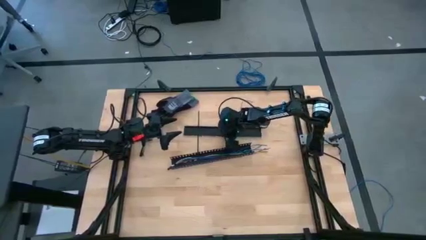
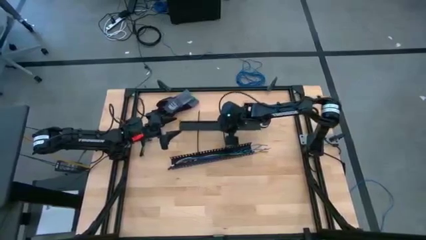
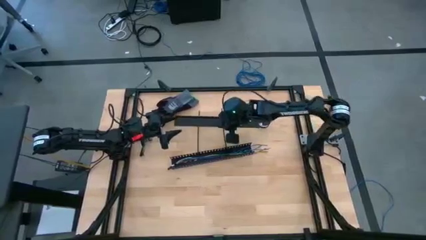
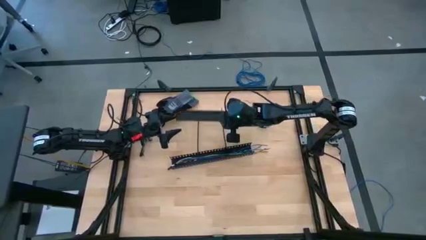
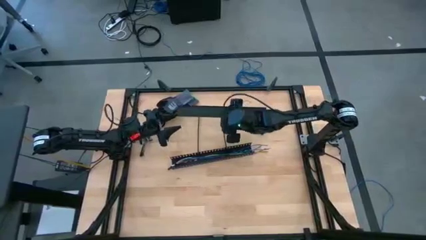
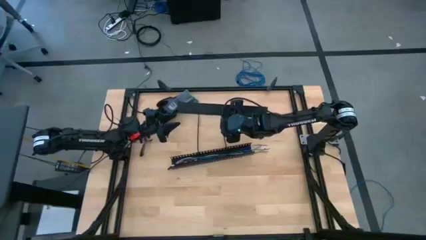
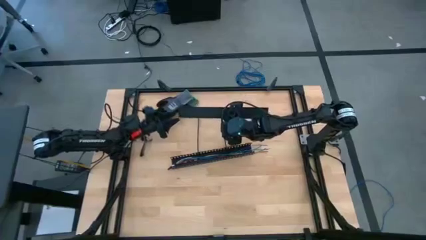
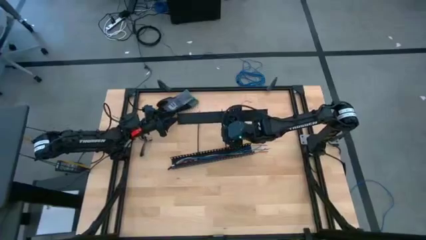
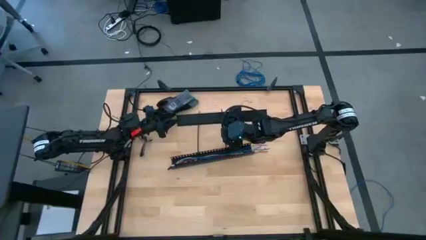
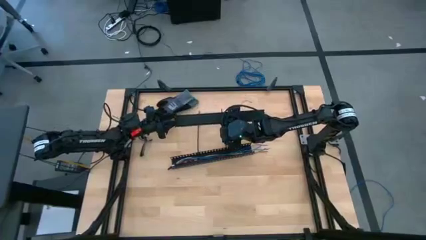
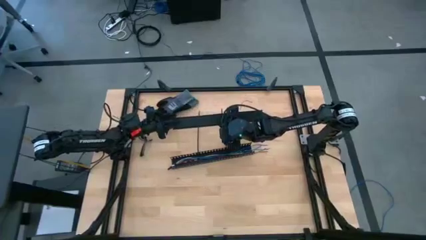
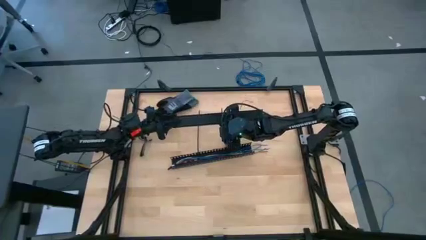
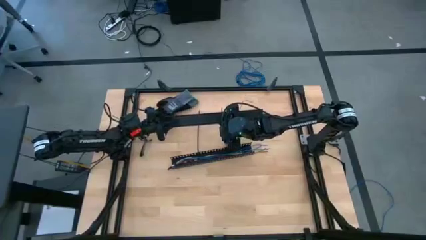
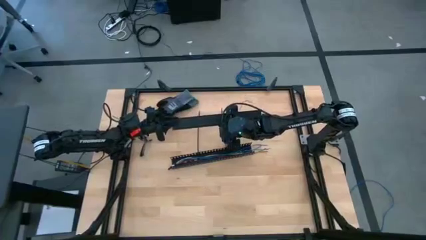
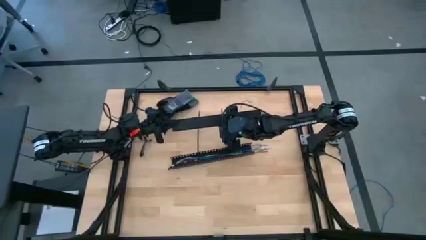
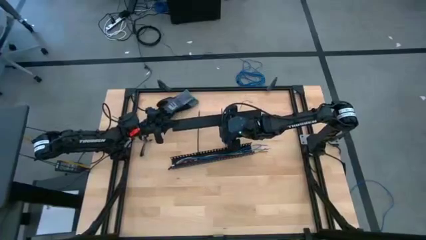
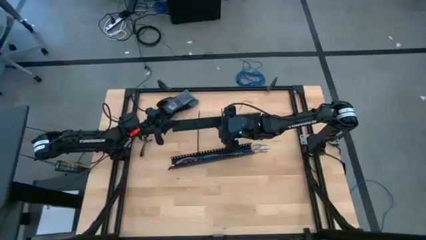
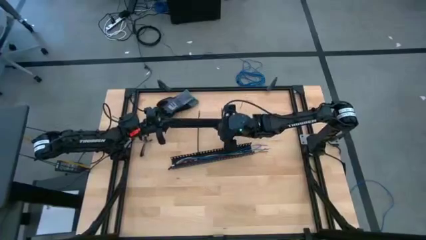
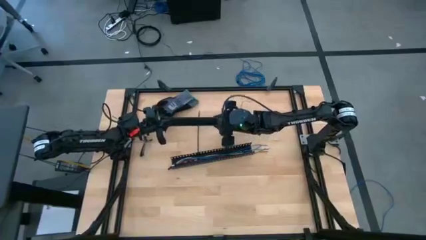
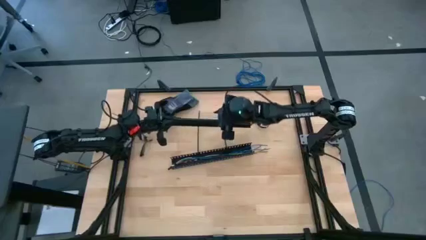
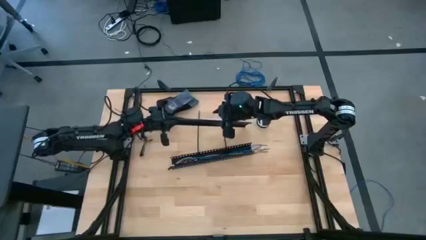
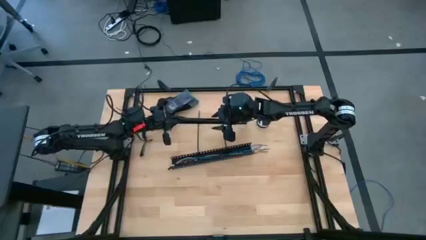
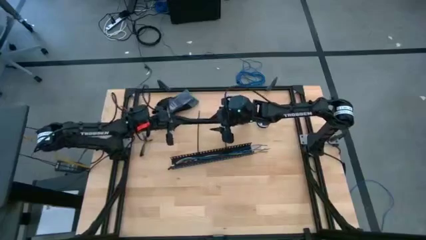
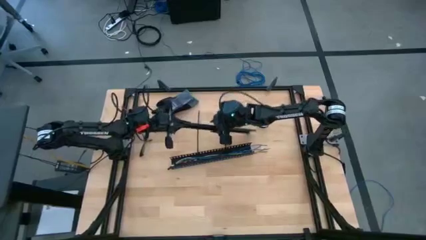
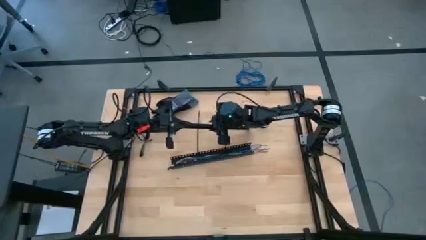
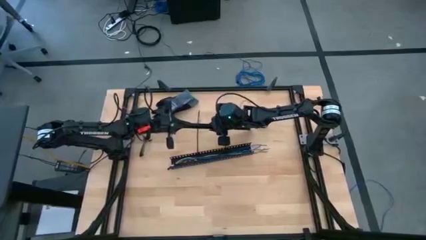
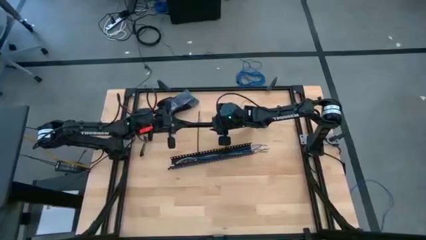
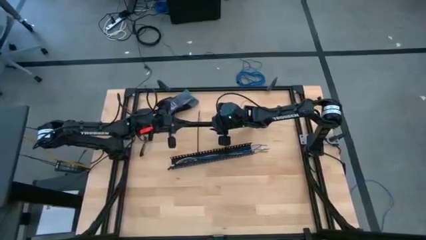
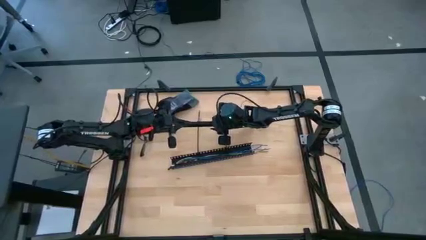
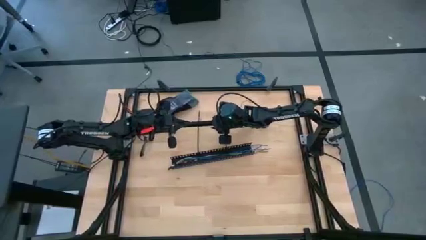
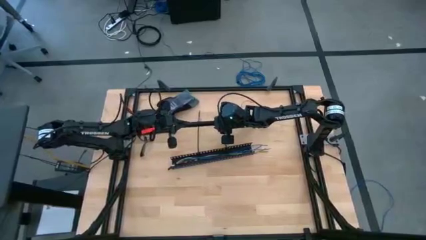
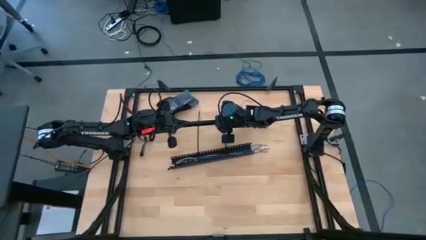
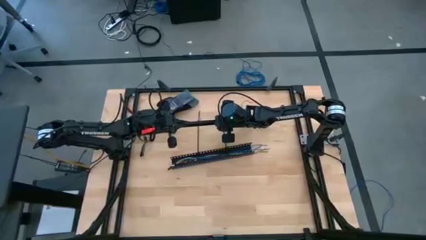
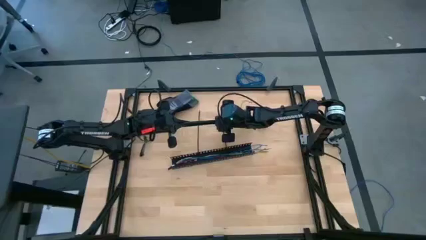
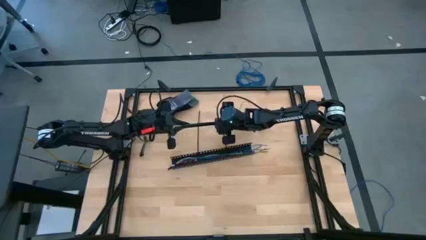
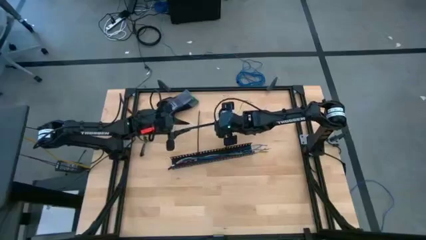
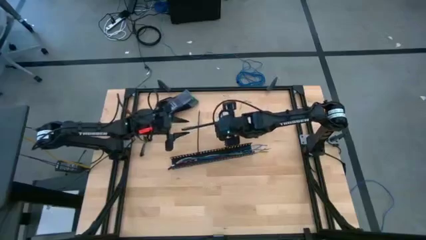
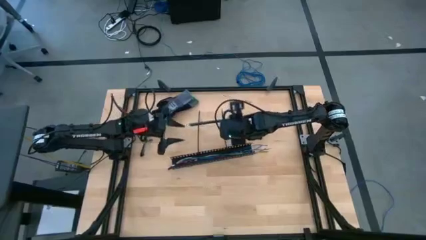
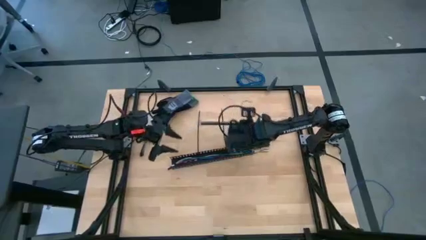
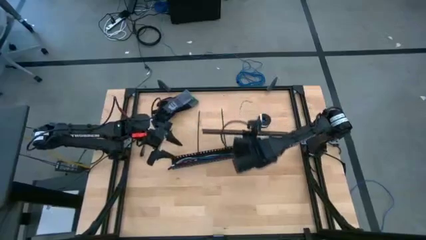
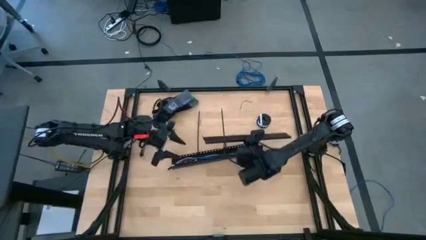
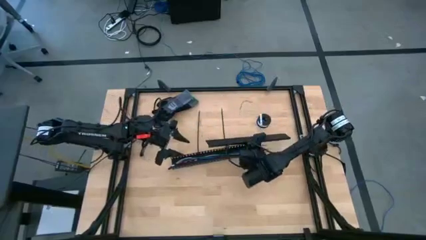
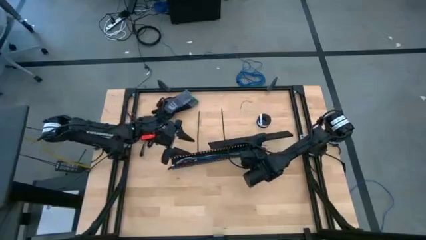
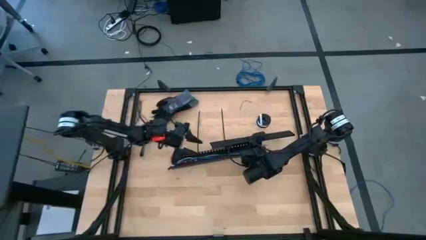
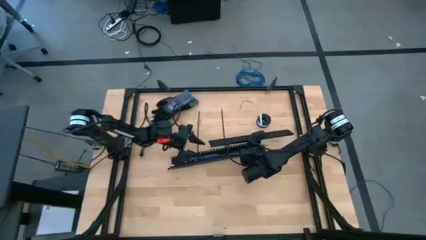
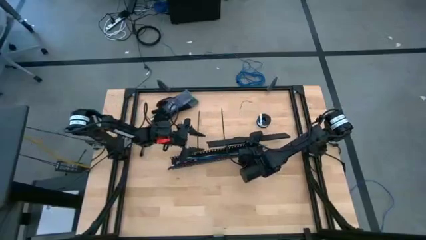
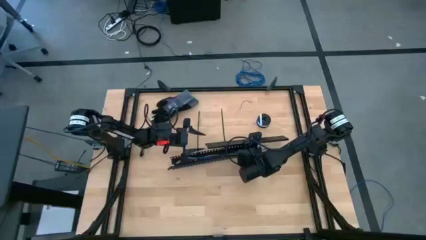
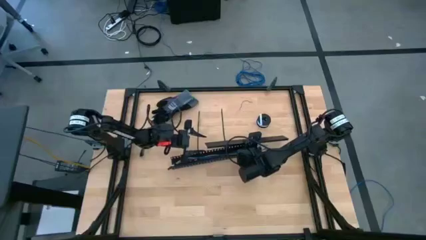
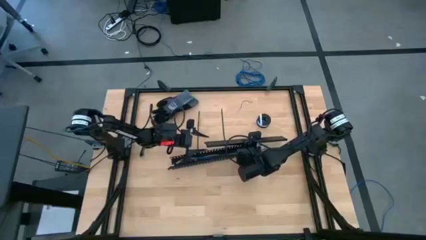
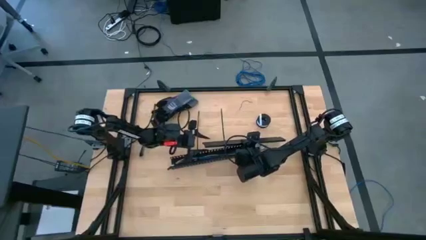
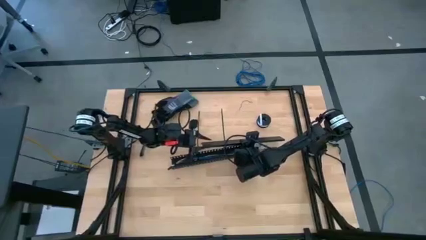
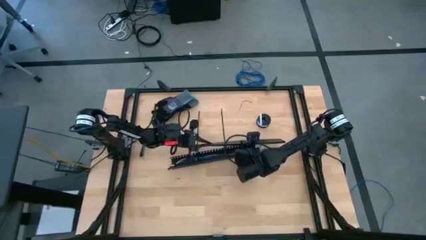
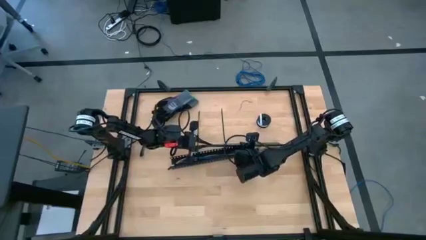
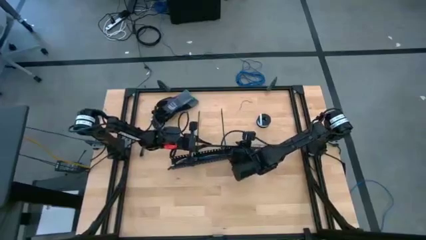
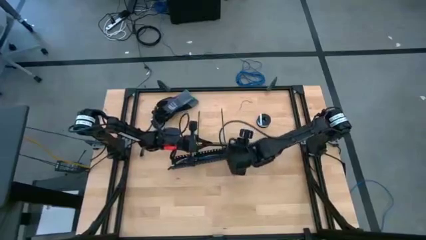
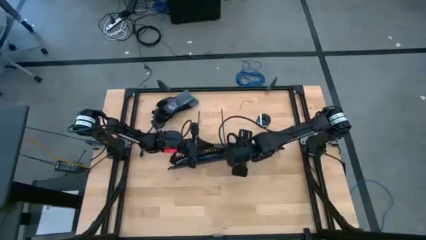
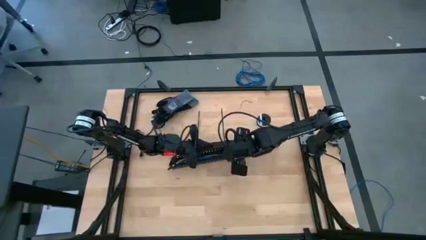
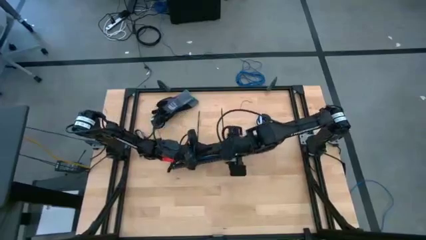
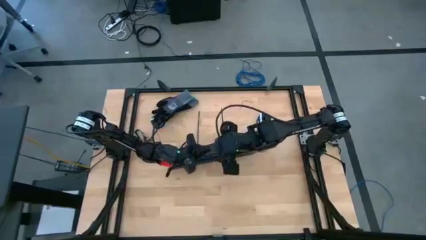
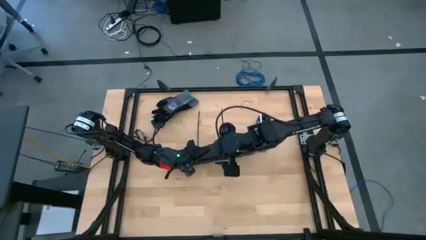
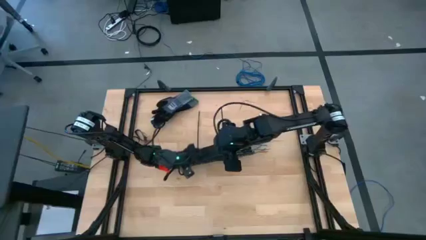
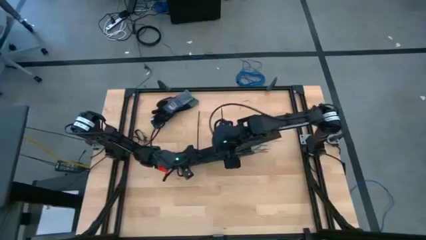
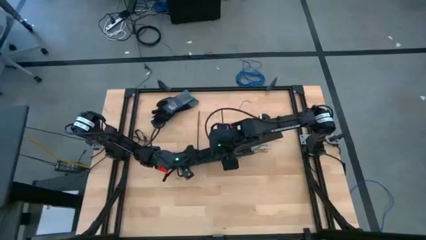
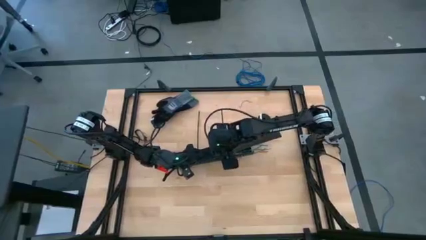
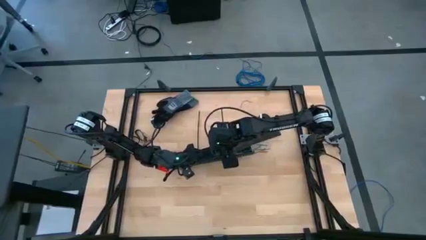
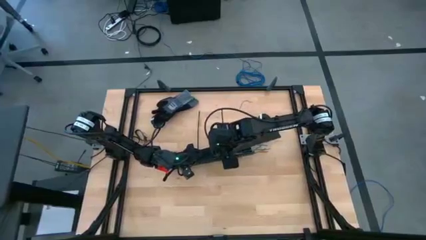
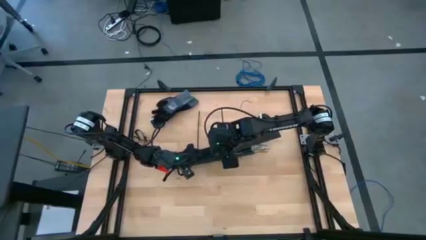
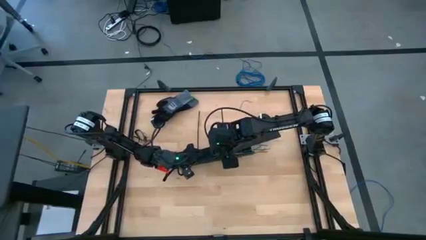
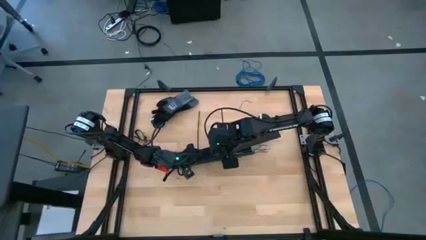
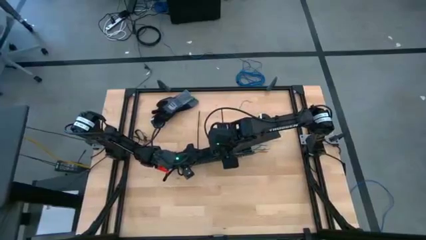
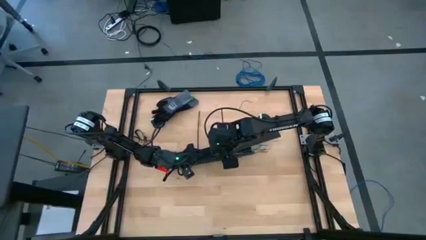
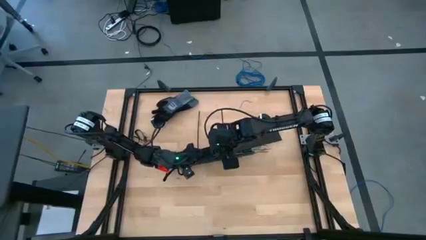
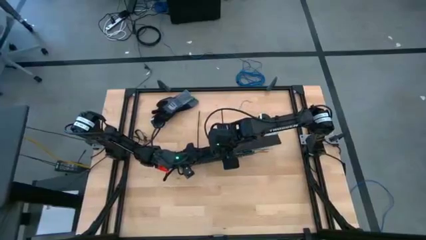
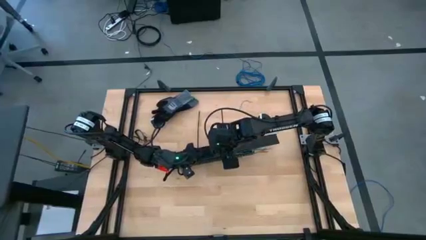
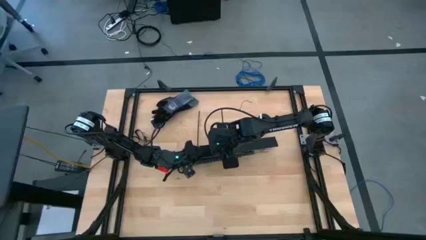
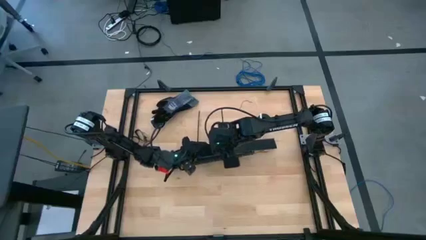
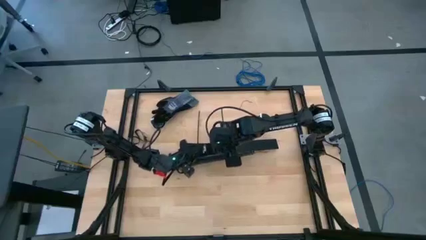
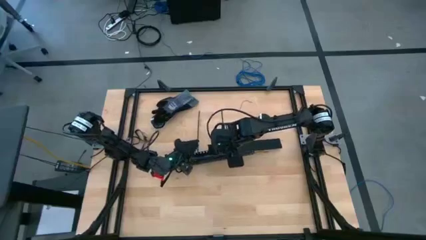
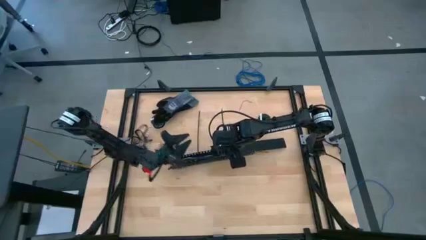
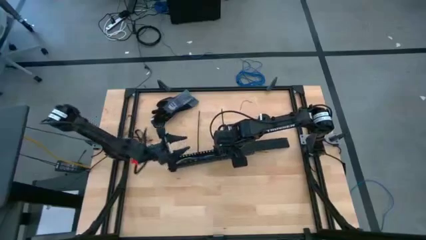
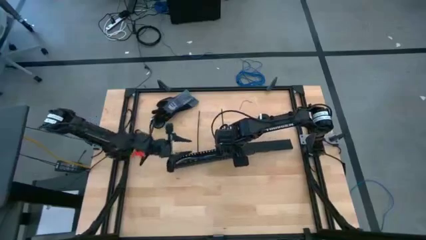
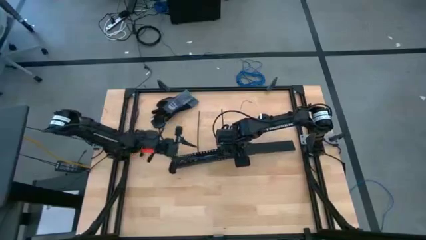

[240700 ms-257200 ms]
Task: Ziptie cables
Close the black cable duct

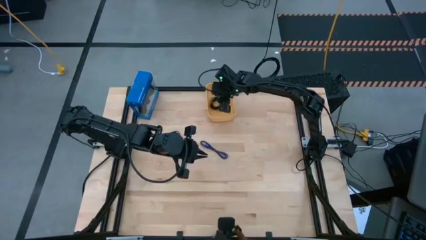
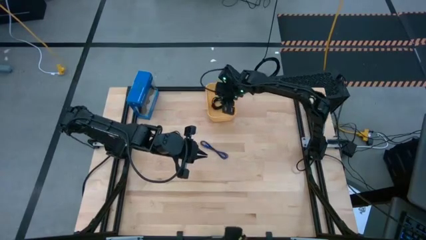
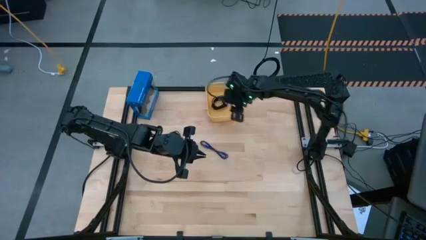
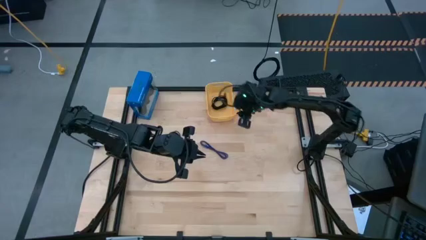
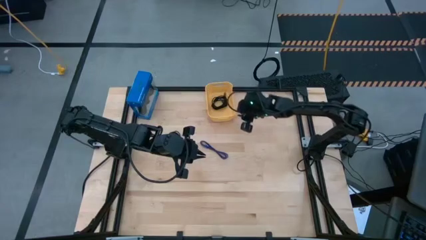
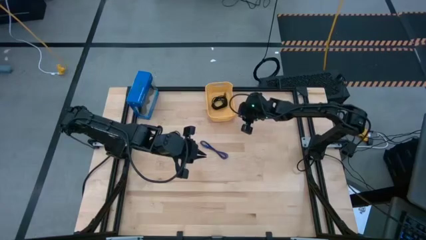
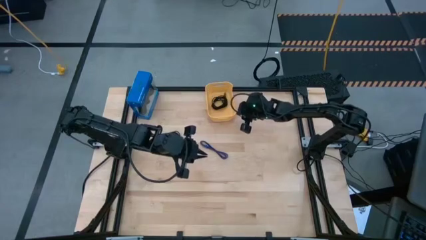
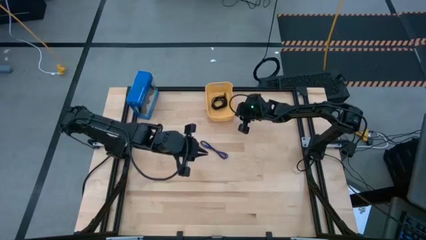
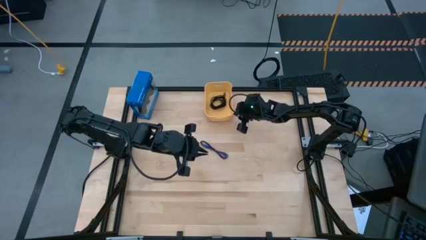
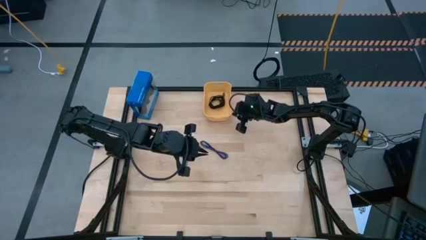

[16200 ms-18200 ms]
Task: Pick and place USB-C Cables
Adjust the yellow bin
